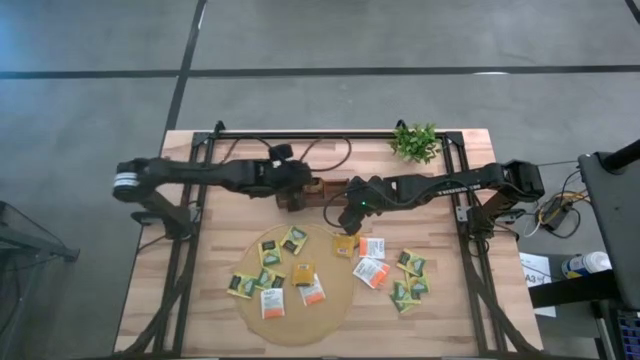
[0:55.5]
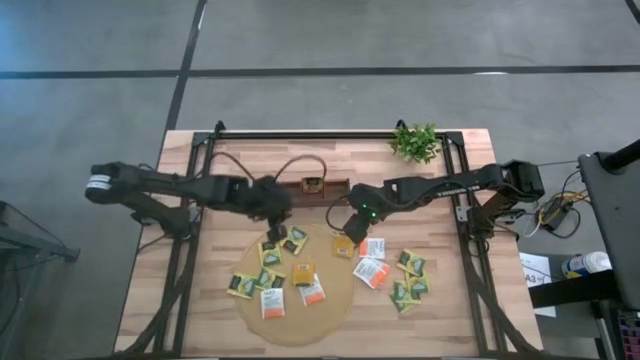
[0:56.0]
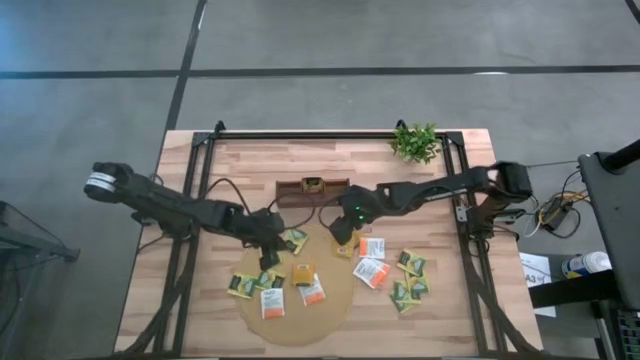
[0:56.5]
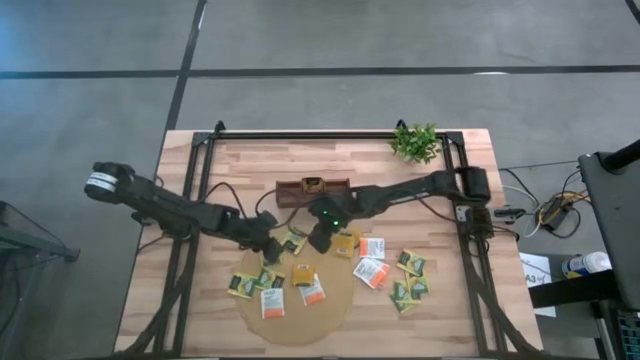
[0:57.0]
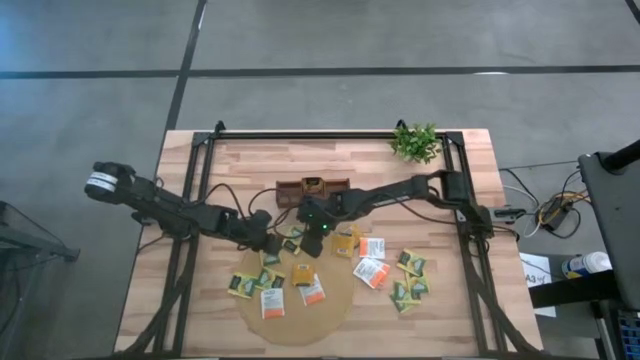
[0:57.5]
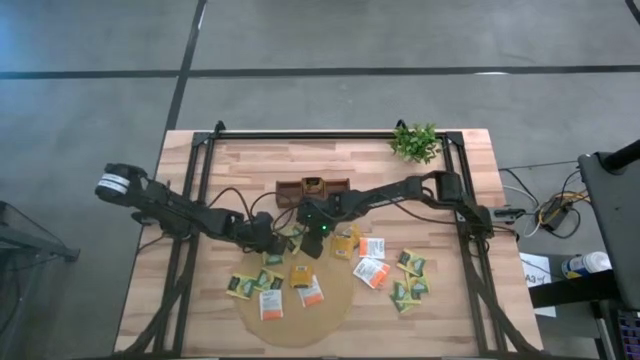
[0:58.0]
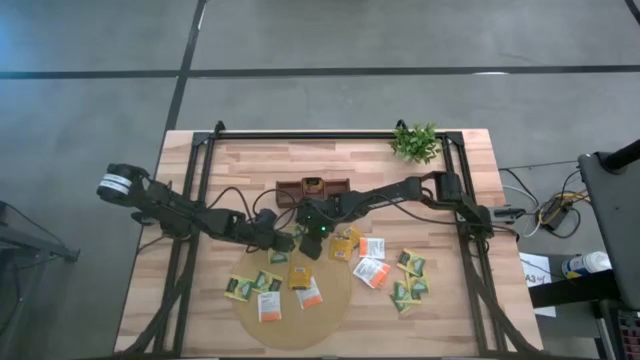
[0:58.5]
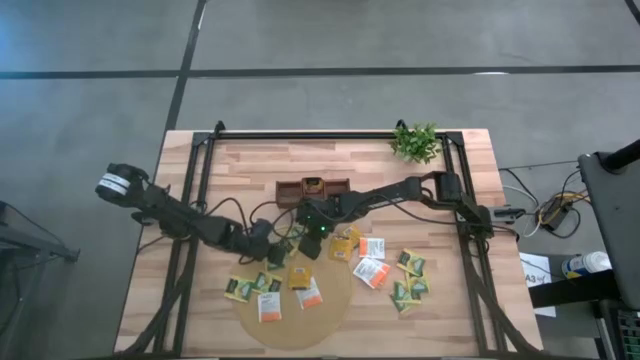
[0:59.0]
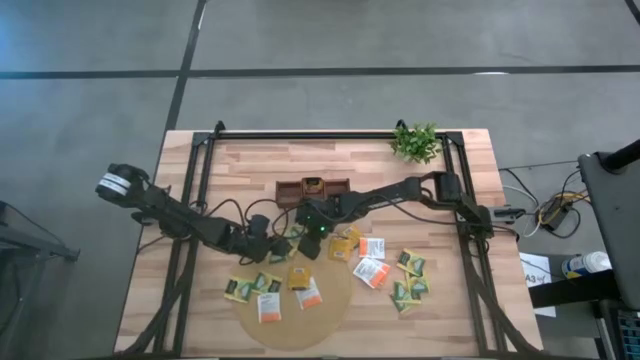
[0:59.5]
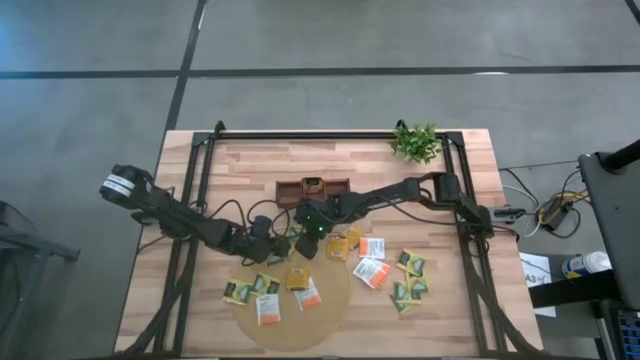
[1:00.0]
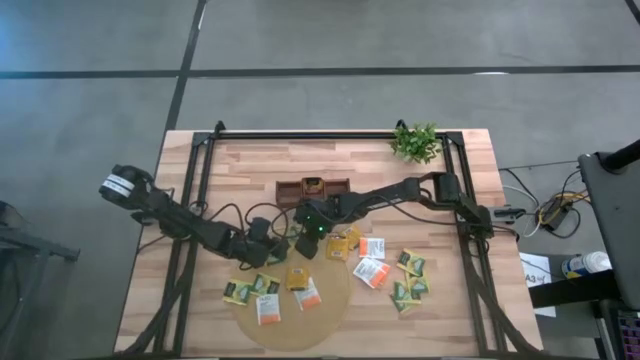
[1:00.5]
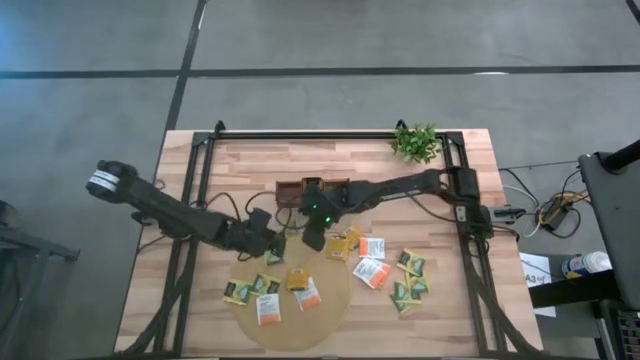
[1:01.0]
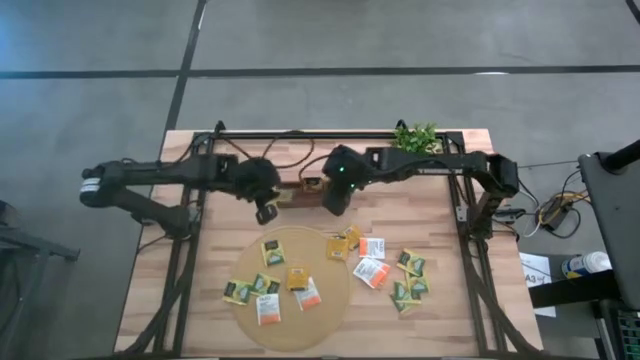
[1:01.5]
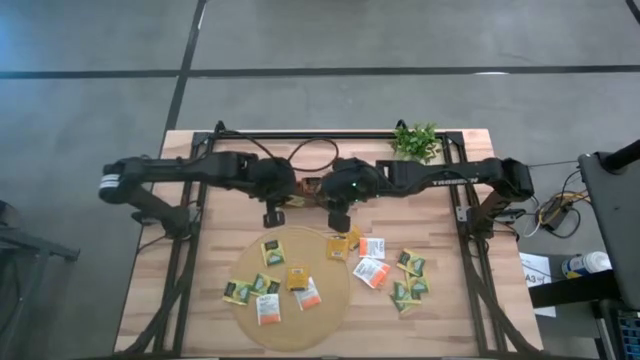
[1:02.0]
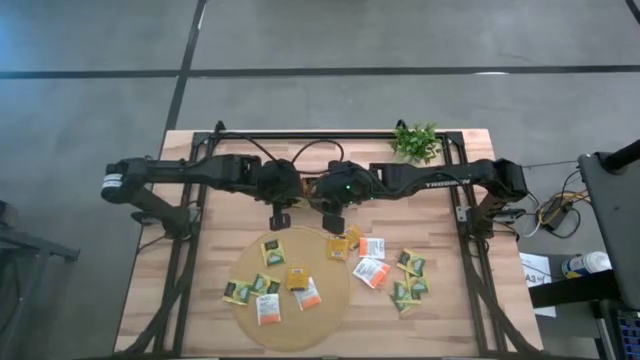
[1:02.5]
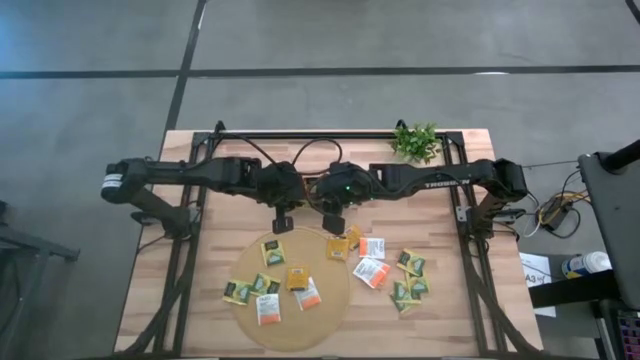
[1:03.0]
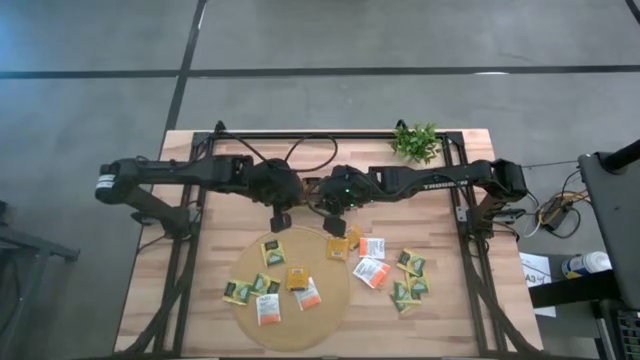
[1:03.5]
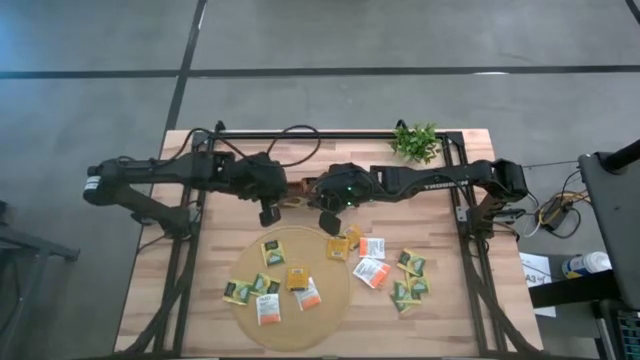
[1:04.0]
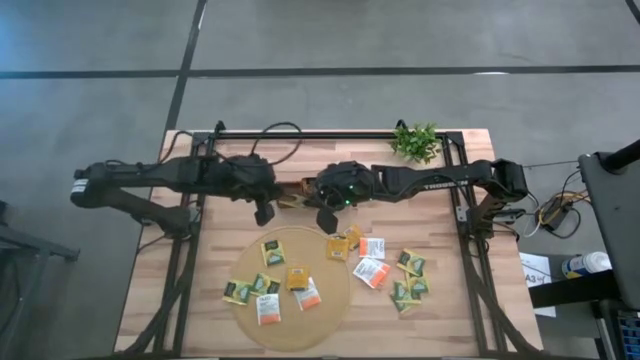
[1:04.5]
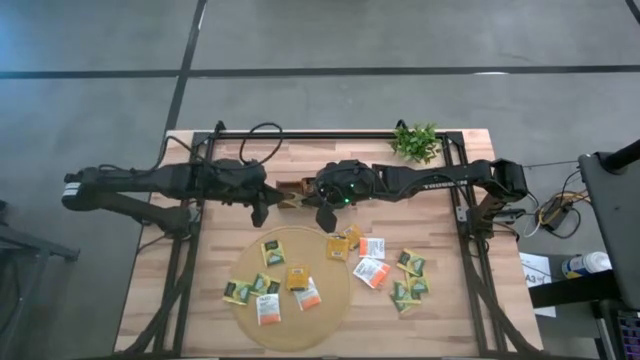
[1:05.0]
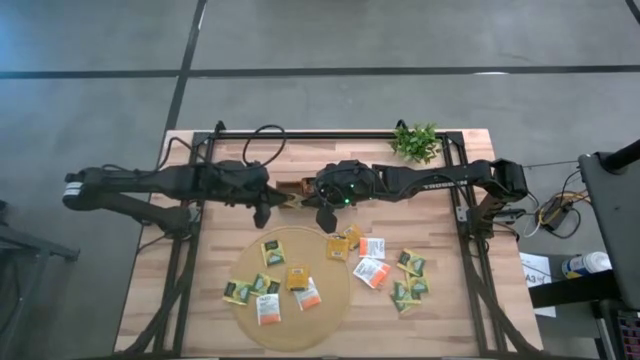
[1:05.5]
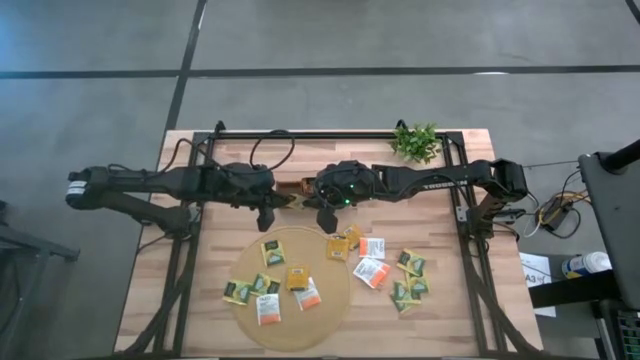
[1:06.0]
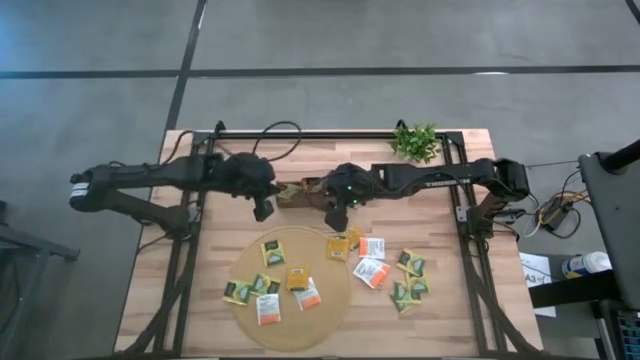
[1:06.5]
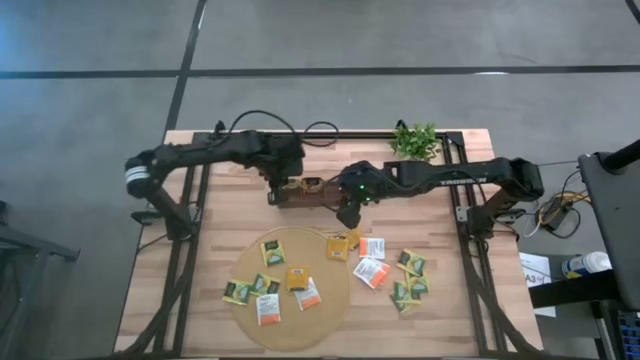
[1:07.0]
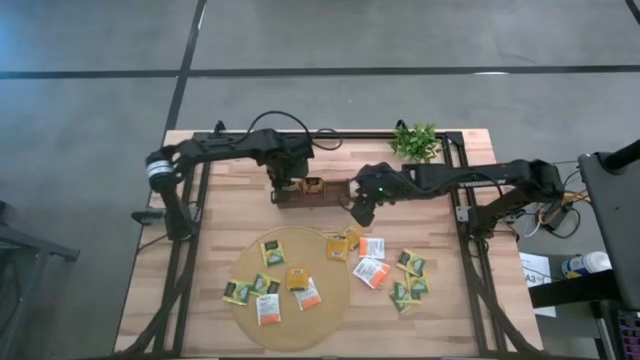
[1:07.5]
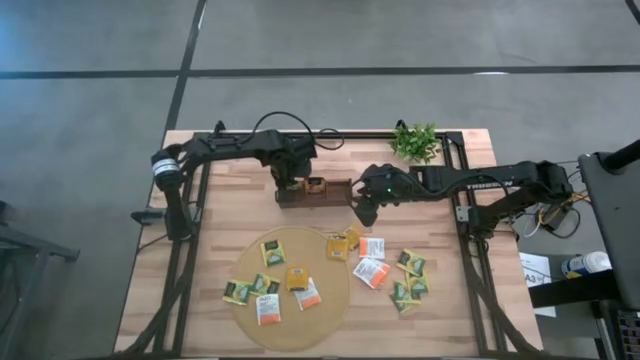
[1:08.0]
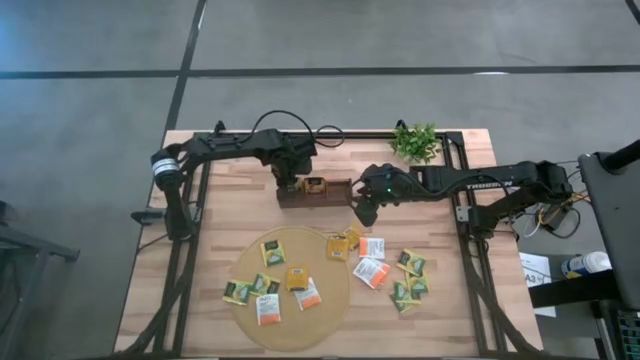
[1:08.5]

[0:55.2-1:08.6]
Task: Pick & Place Tea
Put the green tea bag into the left section of the wooden organizer

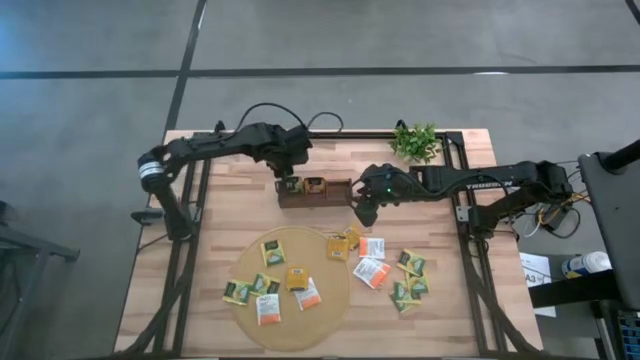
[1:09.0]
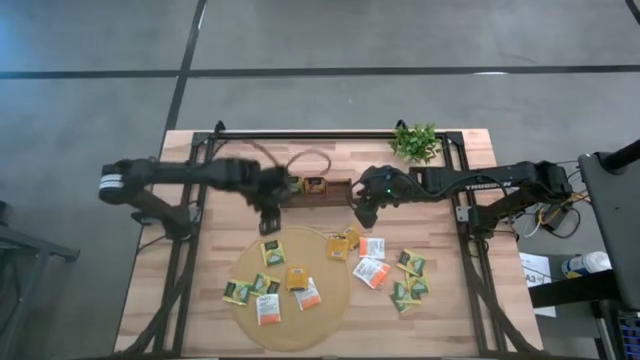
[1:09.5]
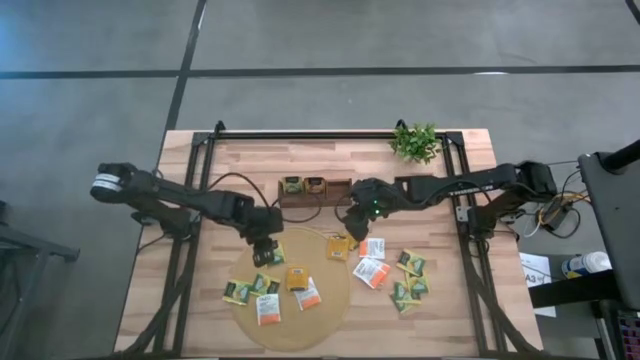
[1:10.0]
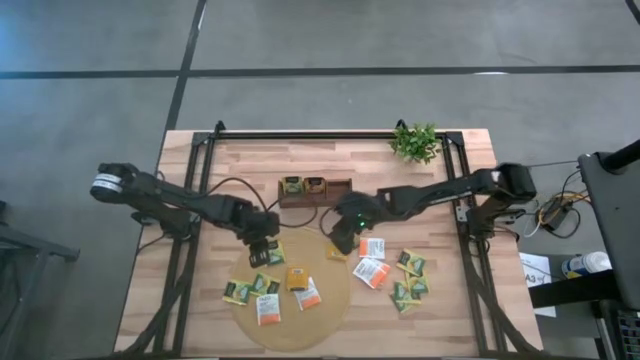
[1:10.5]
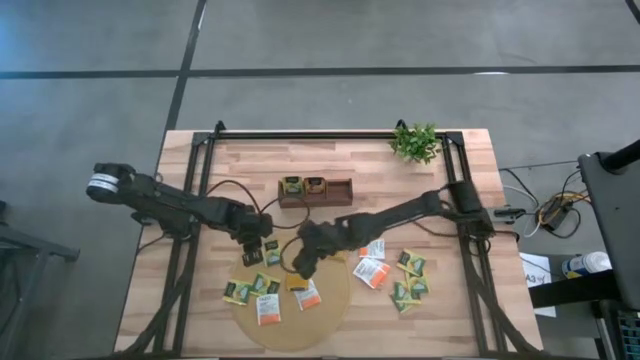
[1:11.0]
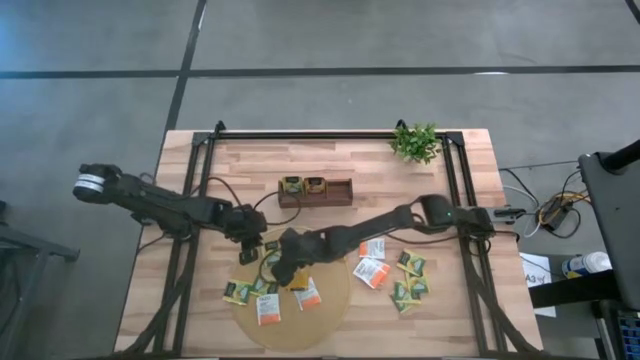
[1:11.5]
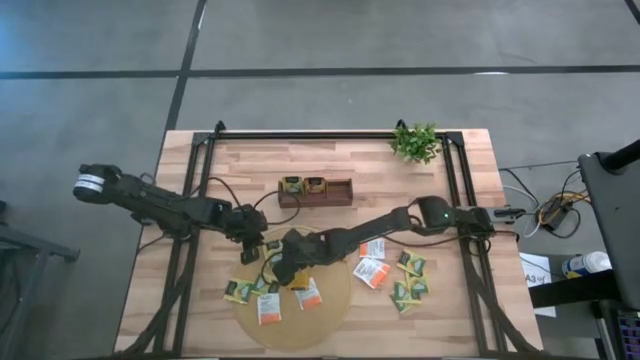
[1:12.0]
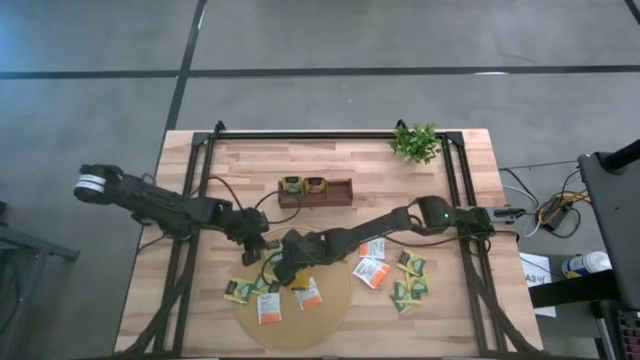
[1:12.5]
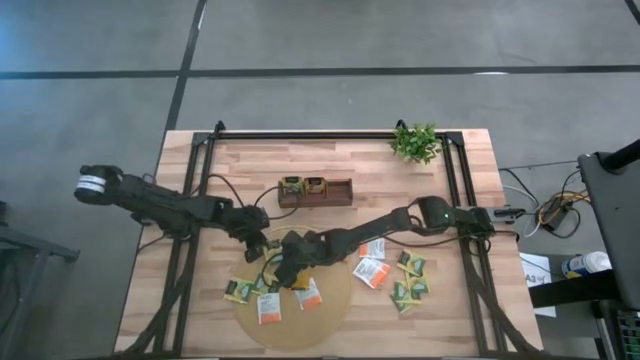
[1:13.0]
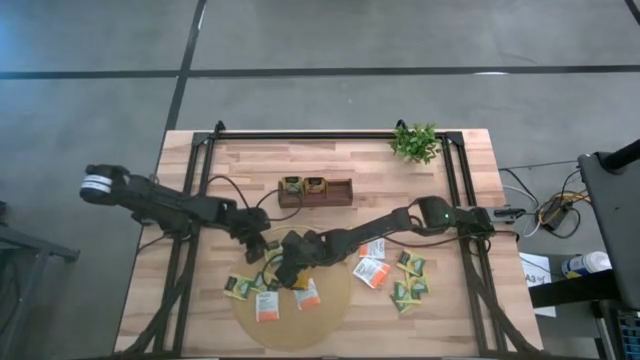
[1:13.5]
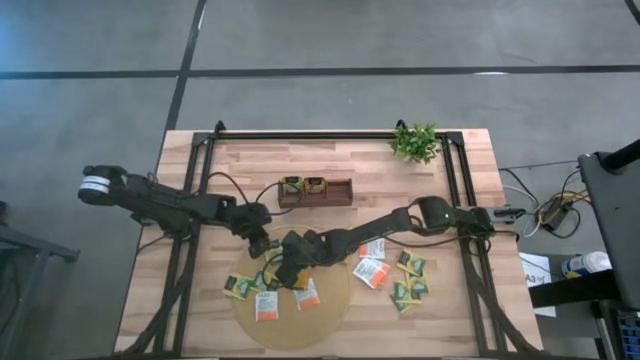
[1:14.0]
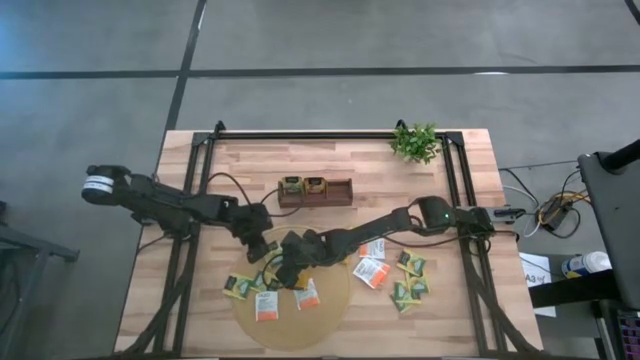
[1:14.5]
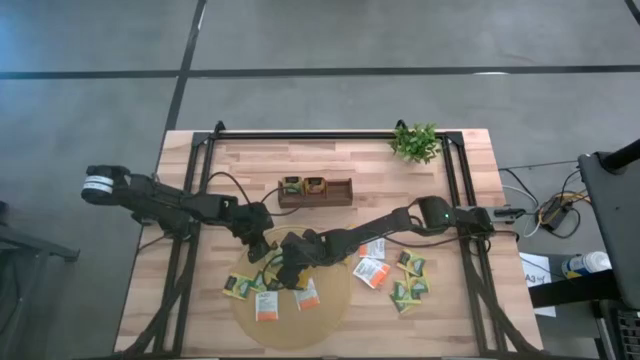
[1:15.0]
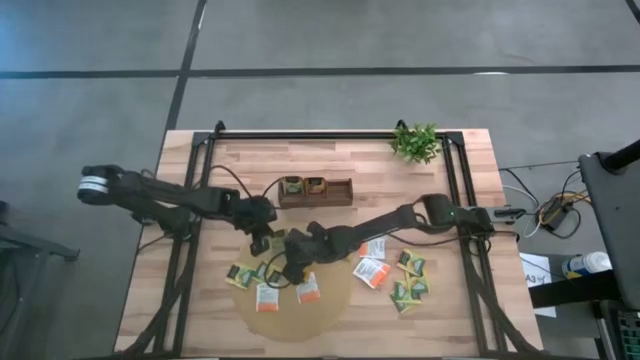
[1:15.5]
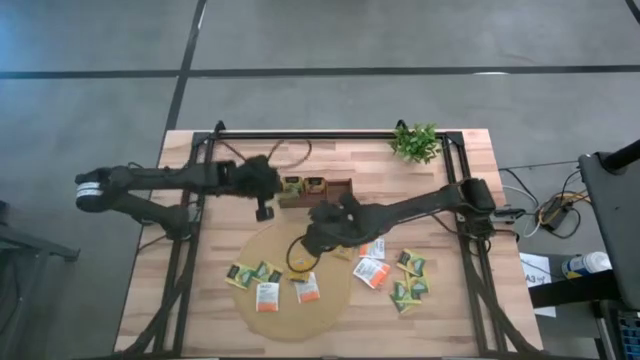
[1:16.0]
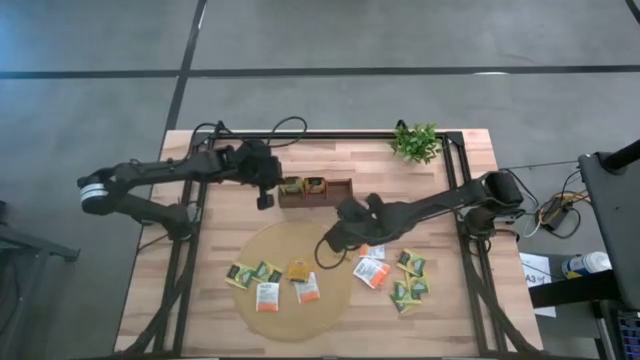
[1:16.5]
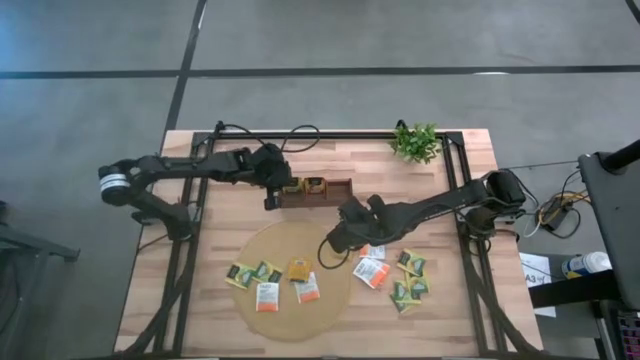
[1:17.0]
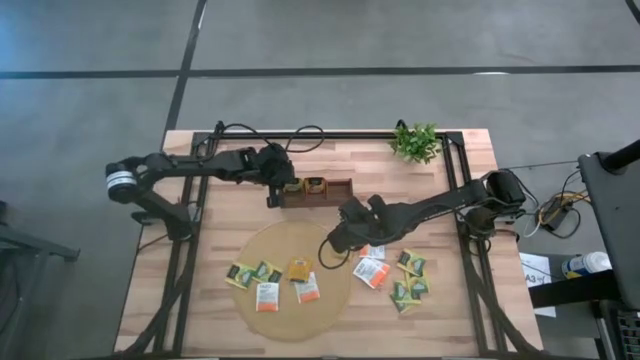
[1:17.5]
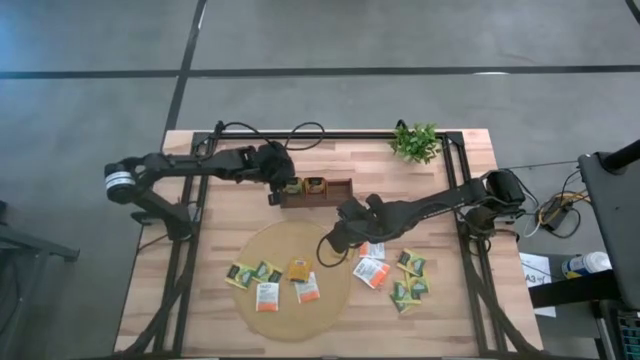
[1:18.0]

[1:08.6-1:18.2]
Put the green tea bag into the left section of the wooden organizer
